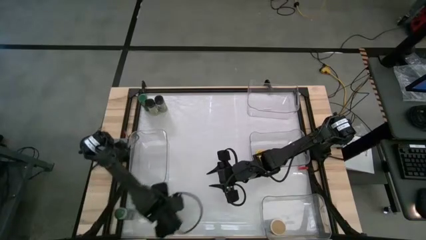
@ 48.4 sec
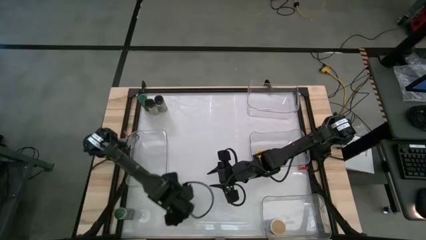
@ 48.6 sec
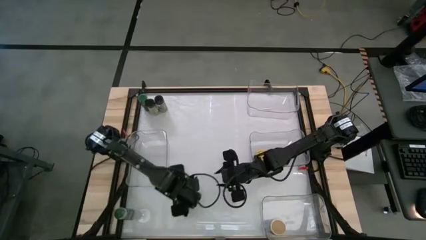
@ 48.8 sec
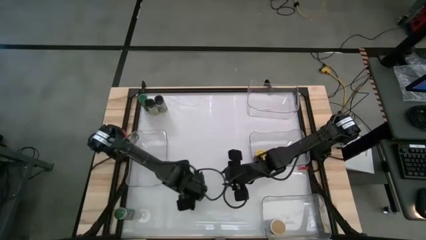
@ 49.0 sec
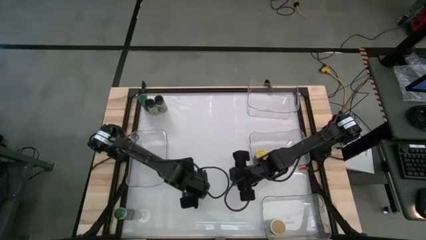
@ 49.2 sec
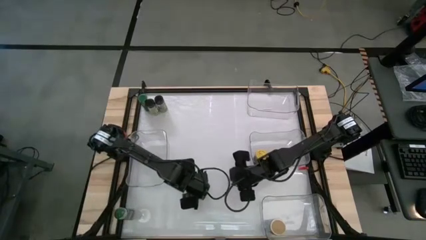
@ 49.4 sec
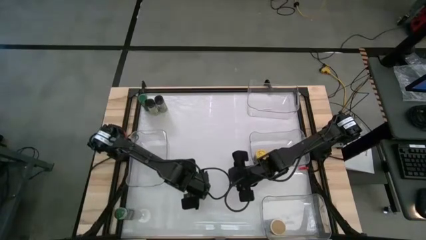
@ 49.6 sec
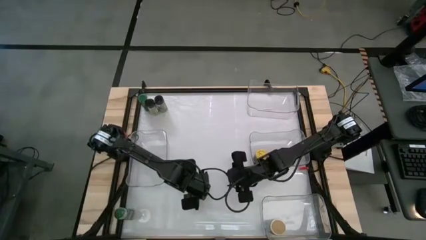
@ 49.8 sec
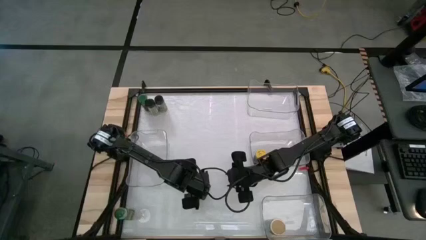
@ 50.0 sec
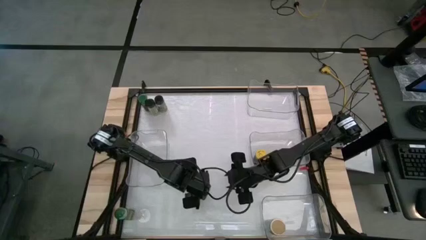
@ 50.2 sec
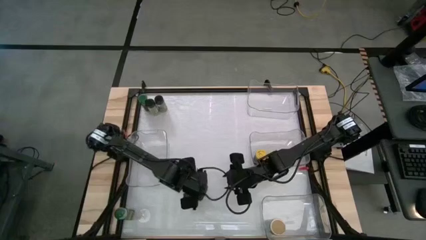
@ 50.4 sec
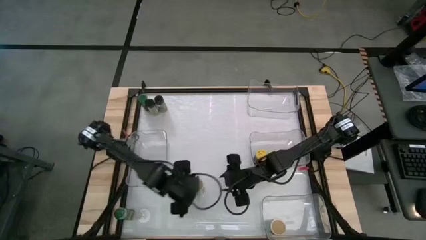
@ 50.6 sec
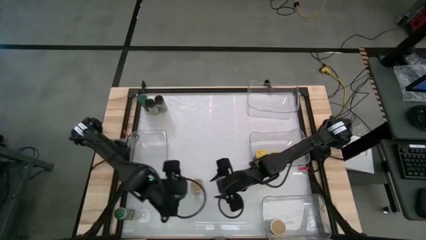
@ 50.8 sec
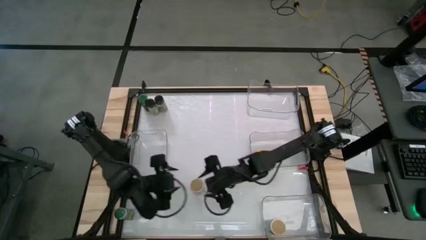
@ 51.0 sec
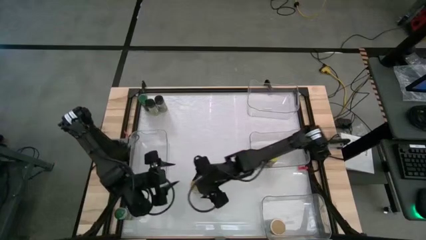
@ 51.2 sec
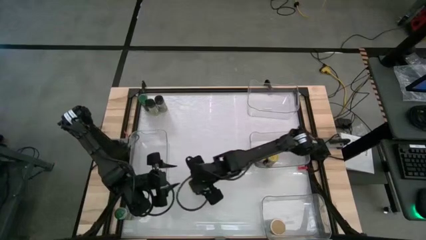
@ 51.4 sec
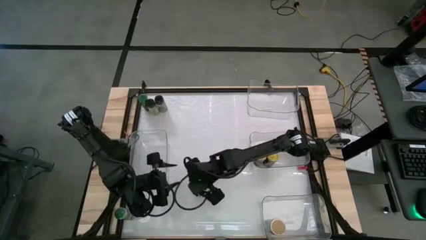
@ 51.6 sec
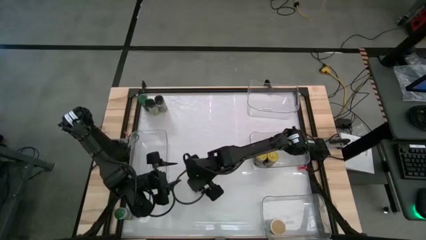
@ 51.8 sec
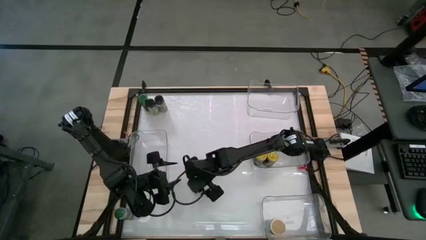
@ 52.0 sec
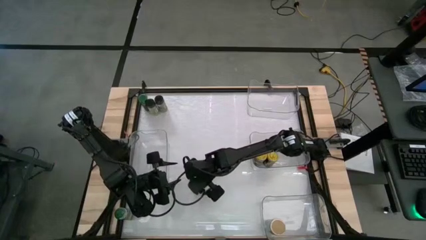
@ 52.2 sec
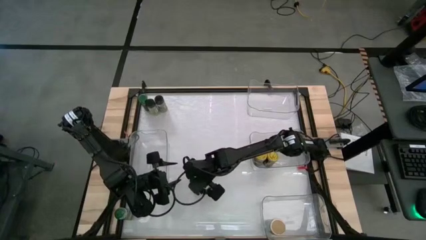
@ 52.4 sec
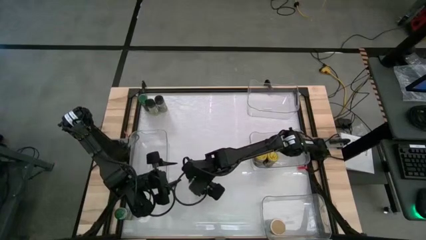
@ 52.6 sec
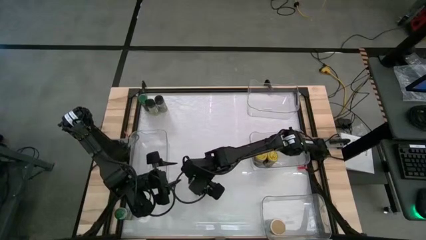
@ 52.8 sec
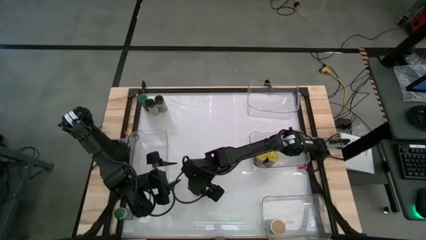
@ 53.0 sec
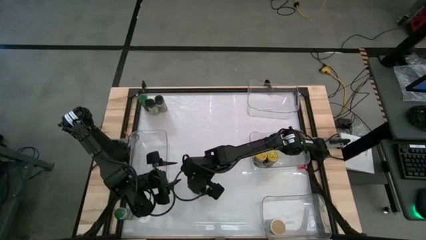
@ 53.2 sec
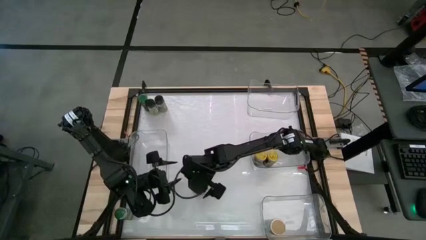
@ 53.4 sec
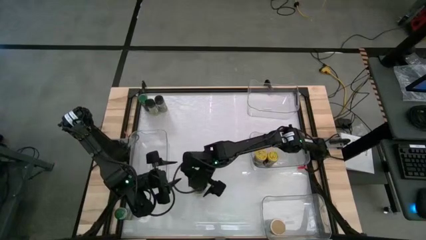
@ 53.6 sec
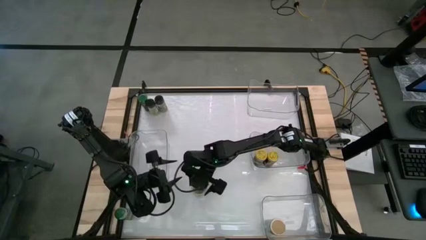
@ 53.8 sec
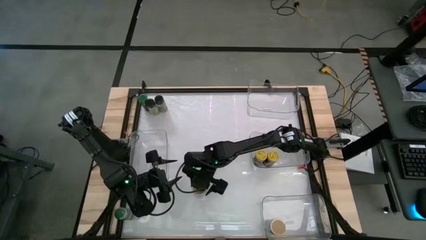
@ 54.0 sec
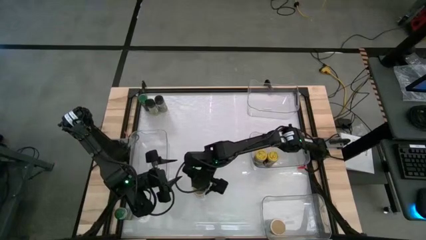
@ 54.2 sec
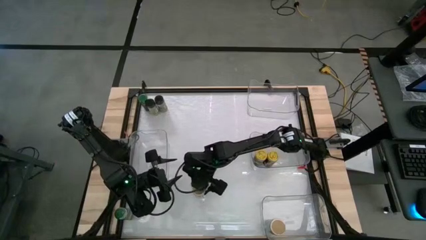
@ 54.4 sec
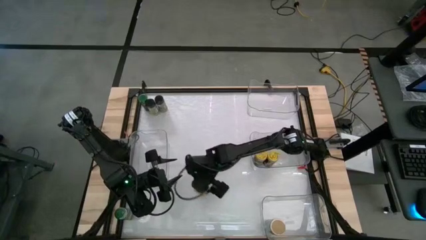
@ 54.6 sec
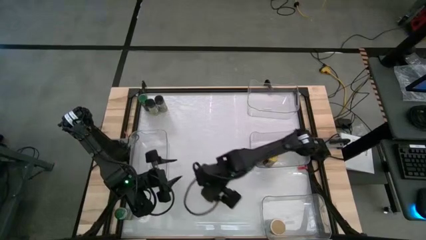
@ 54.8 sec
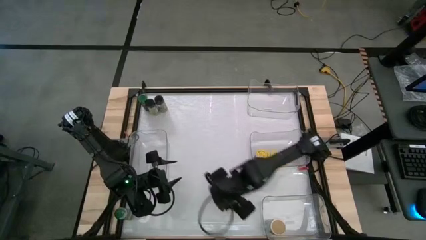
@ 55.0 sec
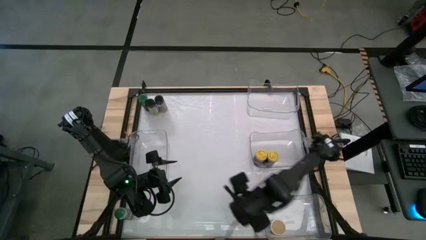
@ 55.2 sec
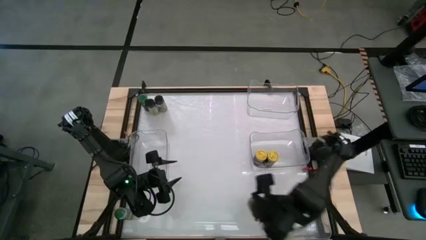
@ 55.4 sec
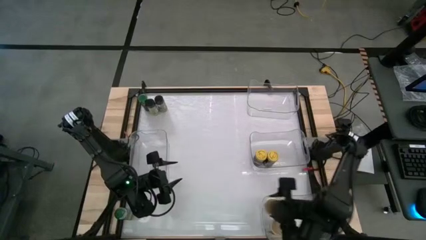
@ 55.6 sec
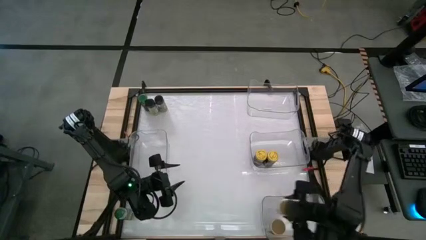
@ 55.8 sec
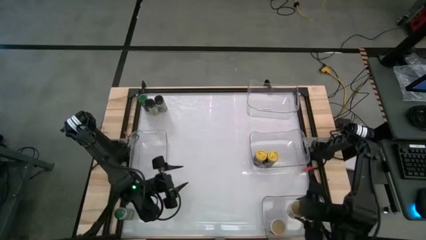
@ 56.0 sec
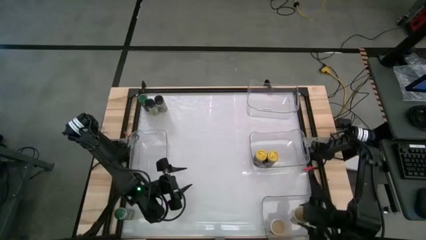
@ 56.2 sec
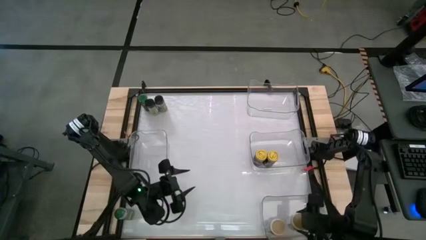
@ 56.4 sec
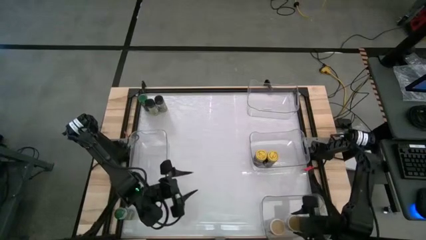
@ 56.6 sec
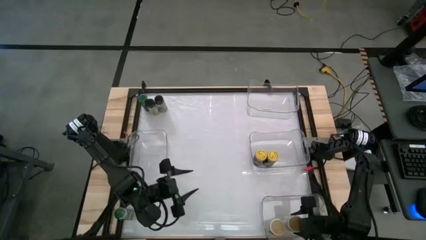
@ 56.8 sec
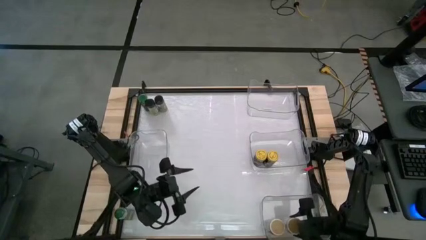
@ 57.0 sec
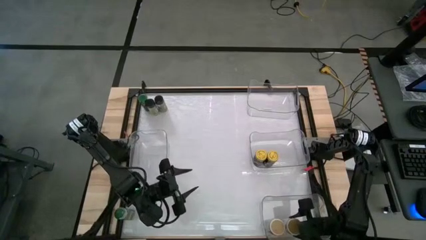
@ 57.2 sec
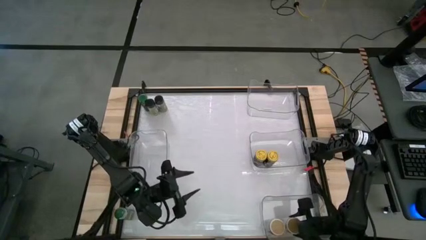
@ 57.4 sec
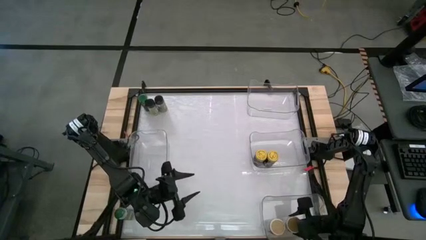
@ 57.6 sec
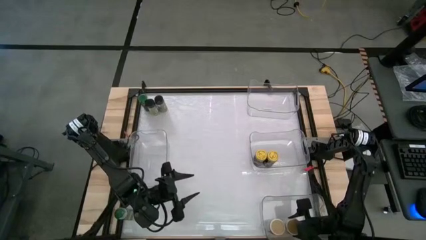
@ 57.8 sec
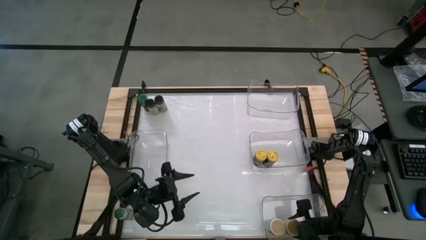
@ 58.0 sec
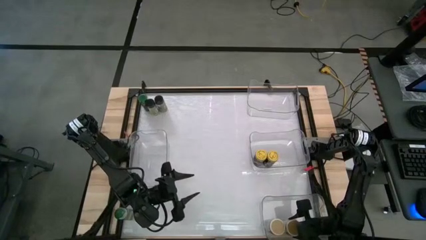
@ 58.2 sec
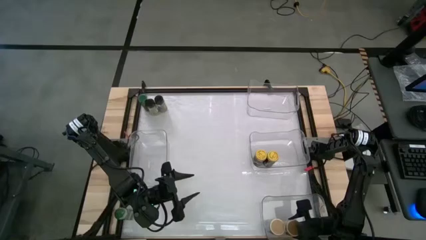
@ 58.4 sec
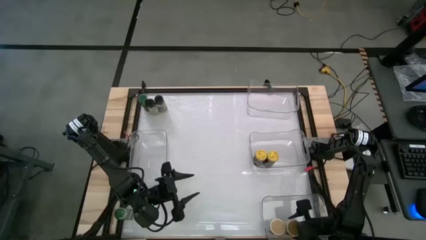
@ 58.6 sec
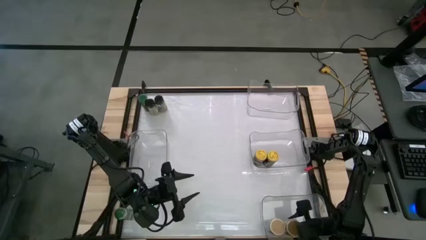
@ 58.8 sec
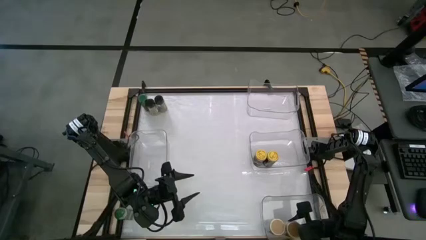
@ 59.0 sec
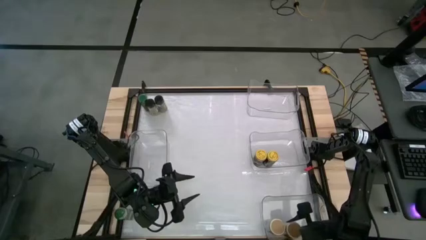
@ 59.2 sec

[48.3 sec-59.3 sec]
Task: Sort spices by type
Put the brown seasoning bottle into the bottom right transparent bin
